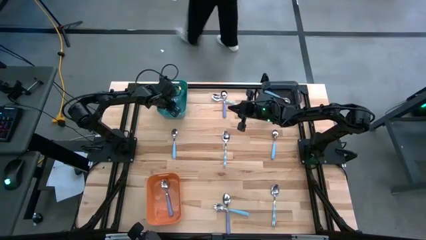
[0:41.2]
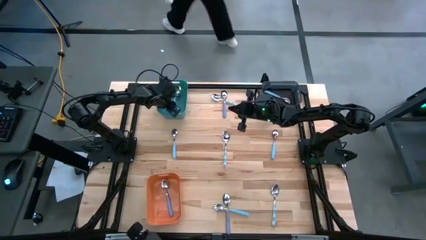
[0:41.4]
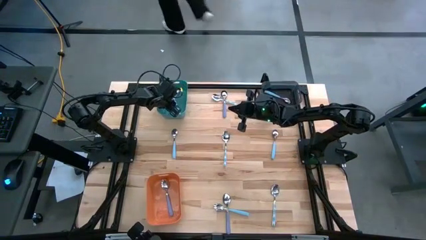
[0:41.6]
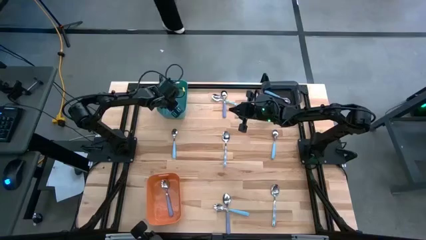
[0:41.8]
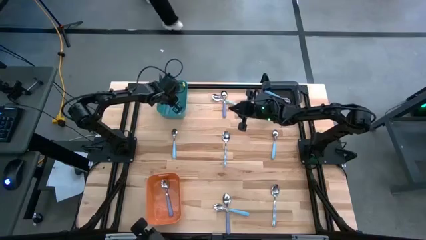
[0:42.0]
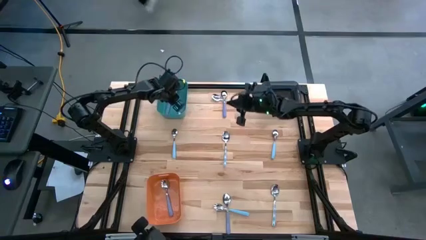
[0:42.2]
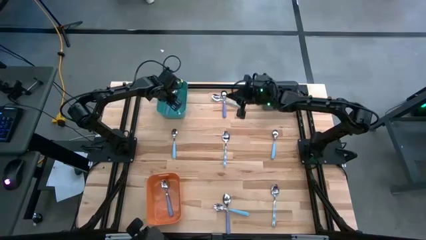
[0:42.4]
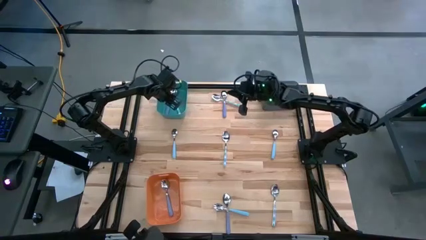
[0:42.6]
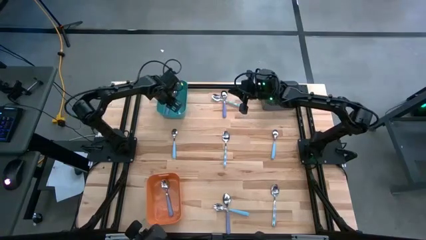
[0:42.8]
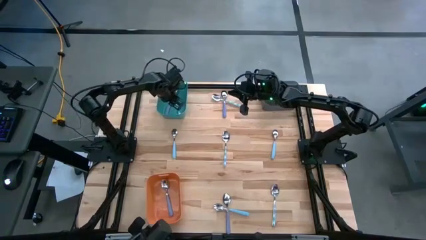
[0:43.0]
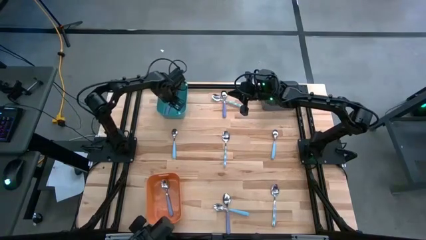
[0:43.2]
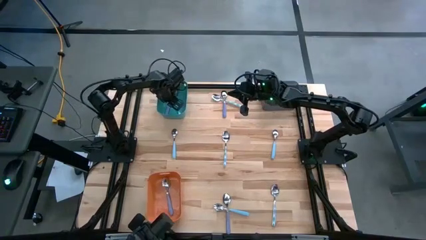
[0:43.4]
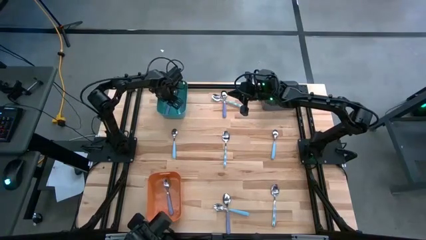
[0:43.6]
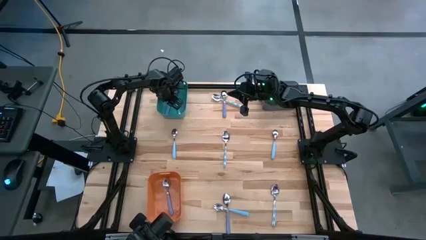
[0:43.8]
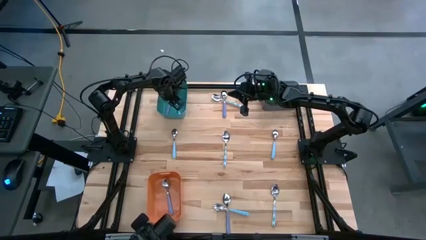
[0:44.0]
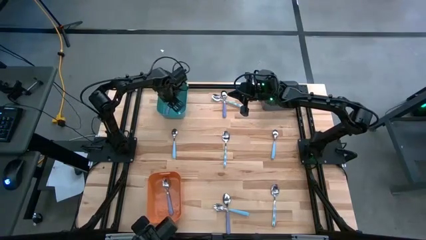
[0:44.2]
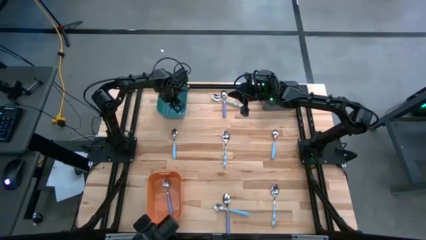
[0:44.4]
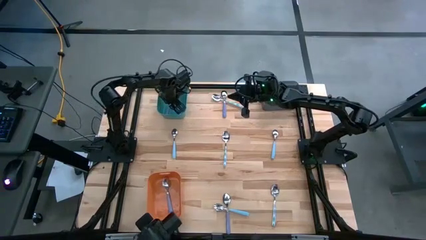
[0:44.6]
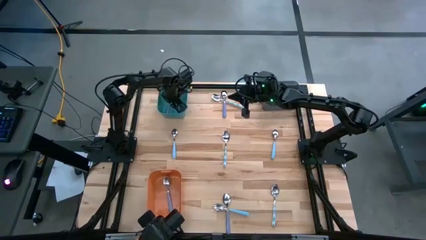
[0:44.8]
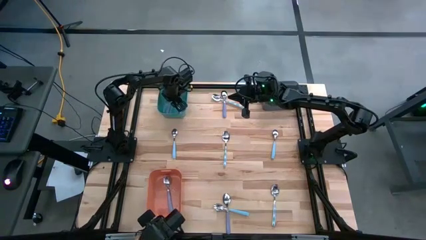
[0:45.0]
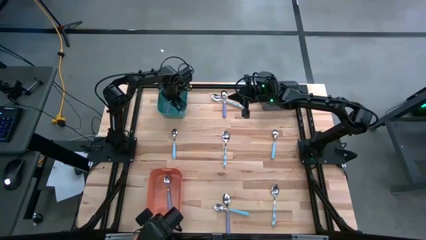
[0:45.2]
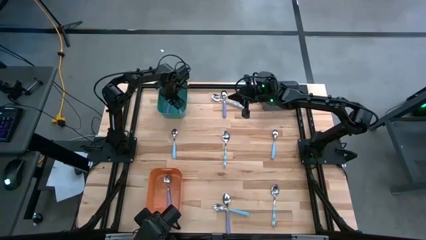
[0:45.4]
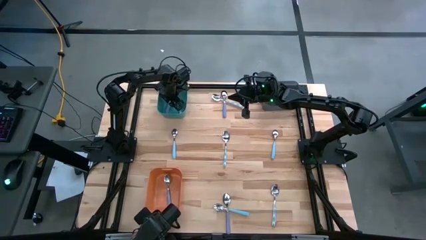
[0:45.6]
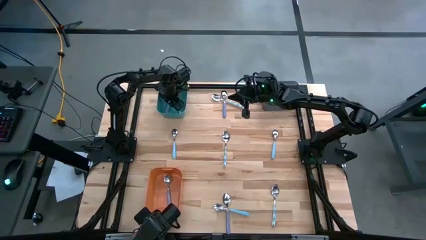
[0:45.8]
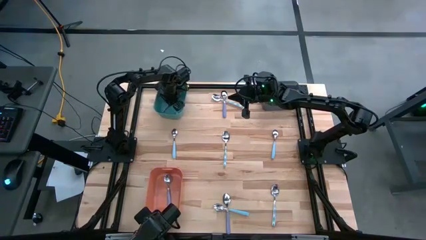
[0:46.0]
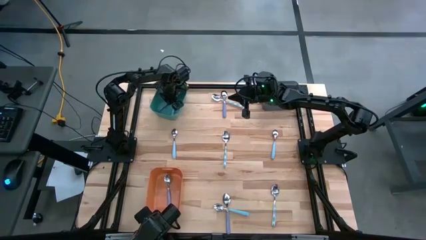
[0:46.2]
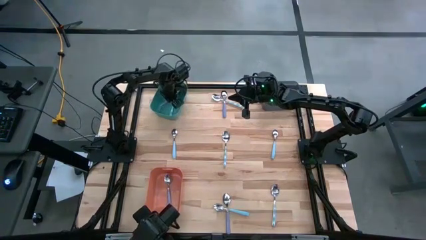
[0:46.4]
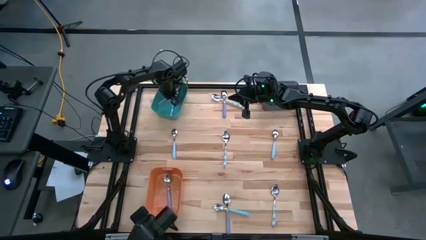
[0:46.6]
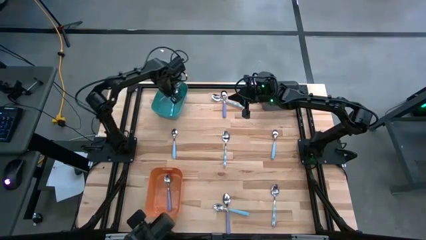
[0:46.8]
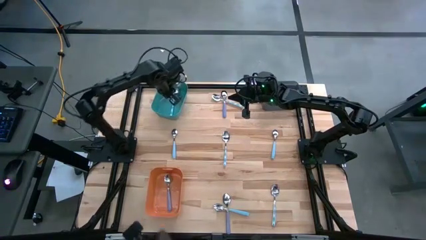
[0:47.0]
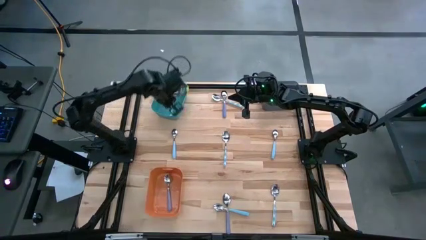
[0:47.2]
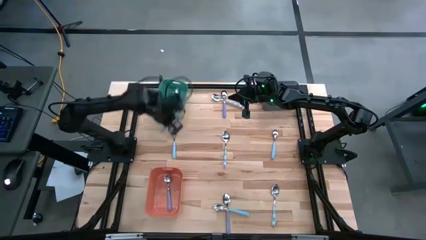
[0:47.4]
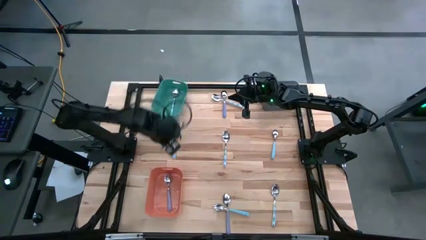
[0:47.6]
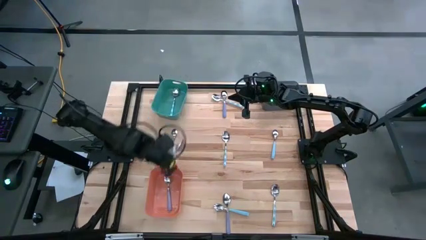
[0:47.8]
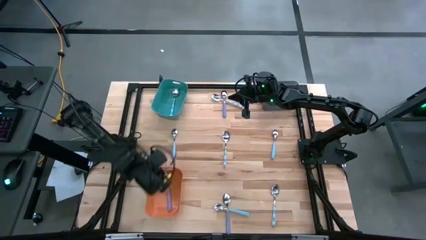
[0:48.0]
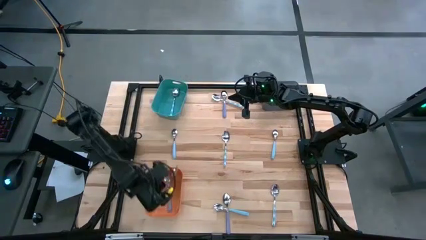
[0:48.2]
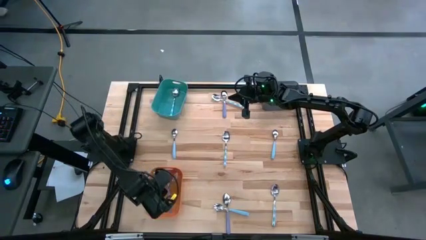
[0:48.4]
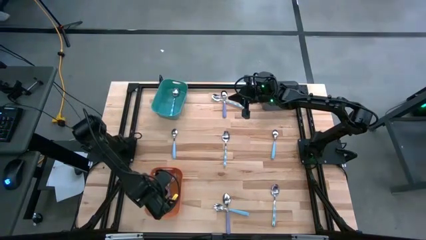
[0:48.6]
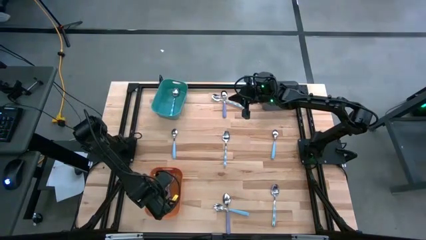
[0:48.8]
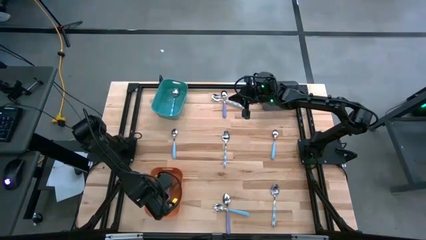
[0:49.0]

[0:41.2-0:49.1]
Task: Sort silverware by color (type)
Put the violet spoon into the orange bin

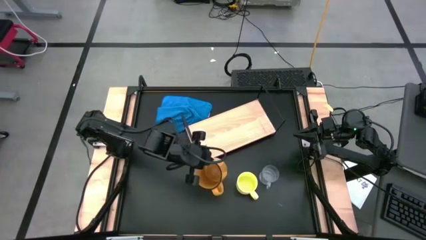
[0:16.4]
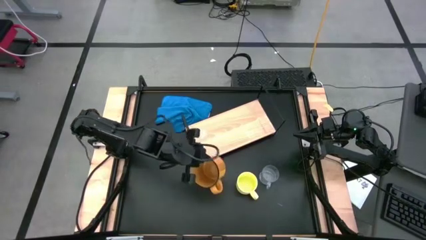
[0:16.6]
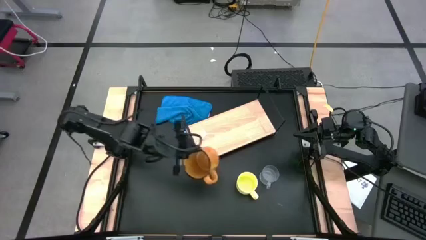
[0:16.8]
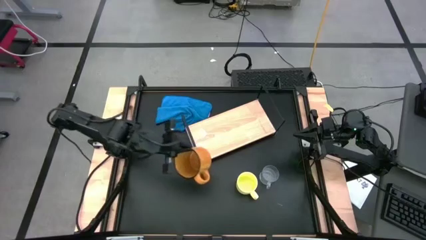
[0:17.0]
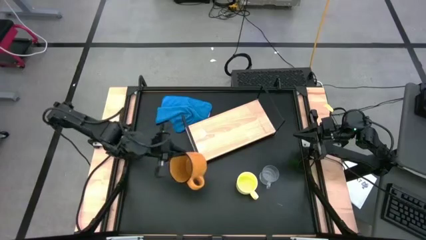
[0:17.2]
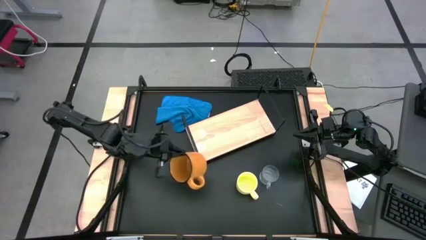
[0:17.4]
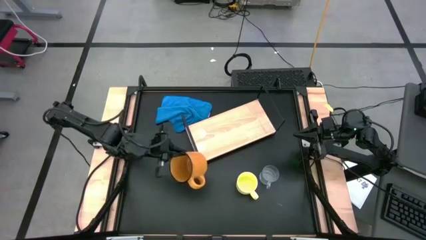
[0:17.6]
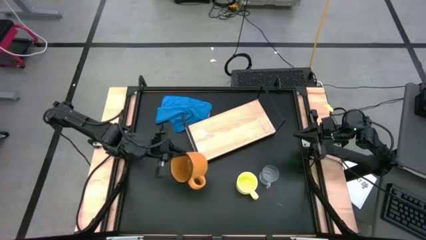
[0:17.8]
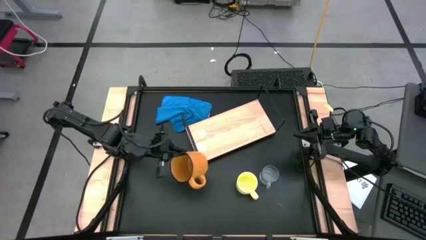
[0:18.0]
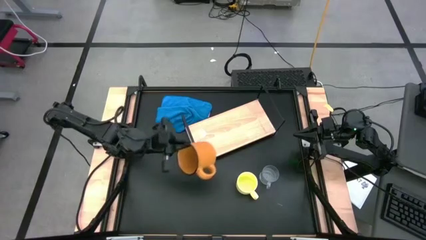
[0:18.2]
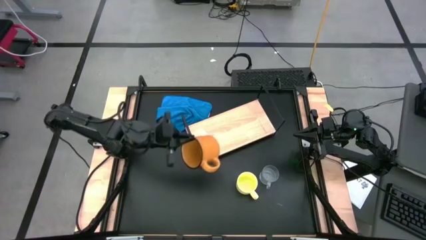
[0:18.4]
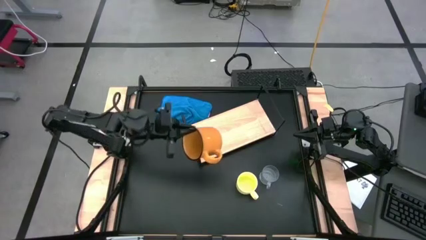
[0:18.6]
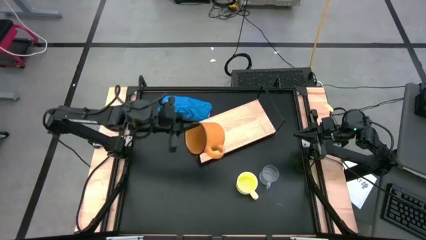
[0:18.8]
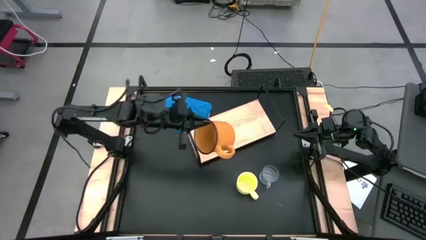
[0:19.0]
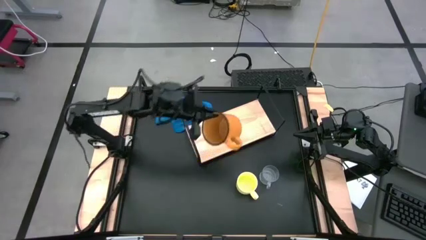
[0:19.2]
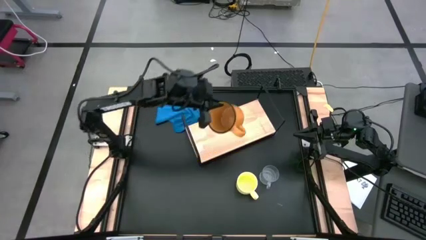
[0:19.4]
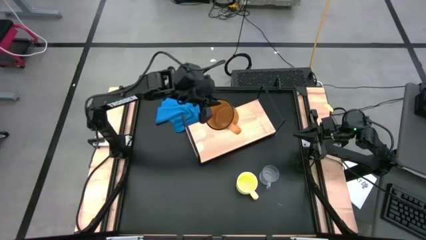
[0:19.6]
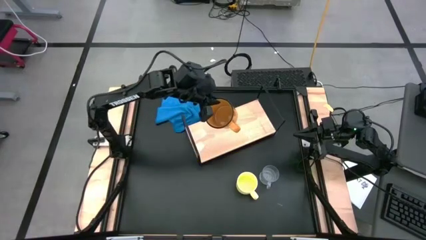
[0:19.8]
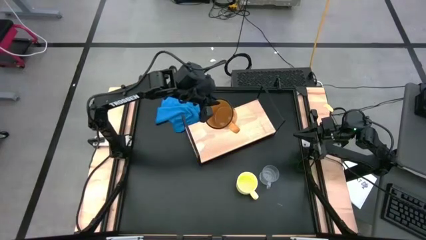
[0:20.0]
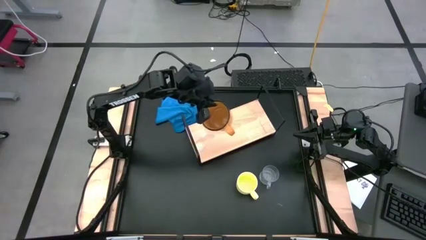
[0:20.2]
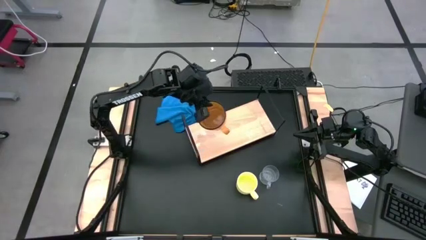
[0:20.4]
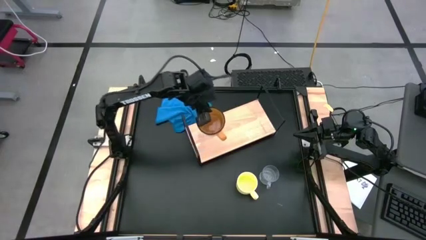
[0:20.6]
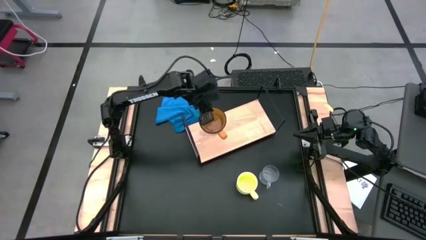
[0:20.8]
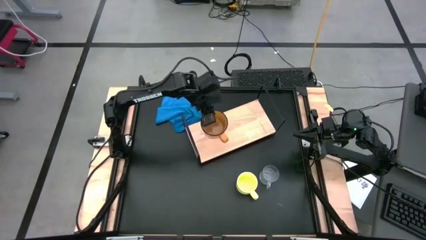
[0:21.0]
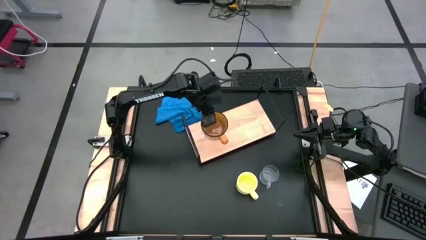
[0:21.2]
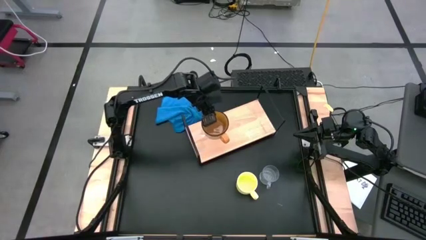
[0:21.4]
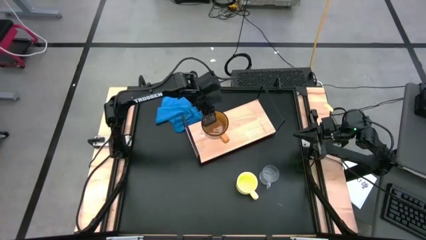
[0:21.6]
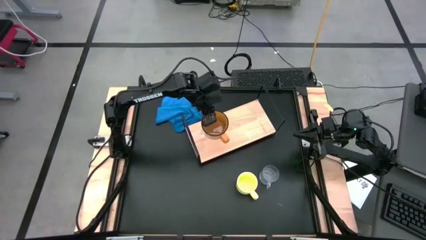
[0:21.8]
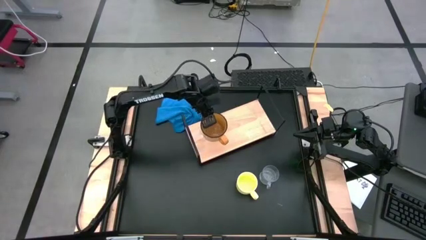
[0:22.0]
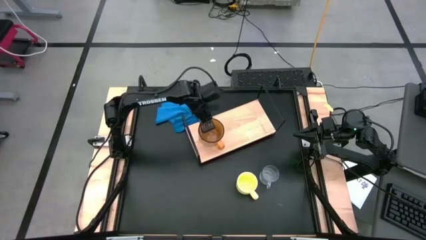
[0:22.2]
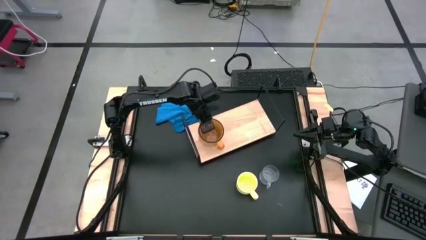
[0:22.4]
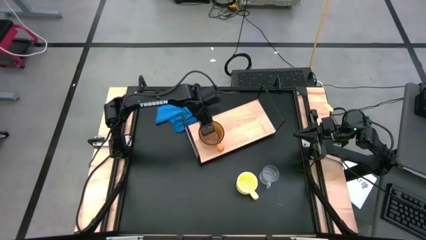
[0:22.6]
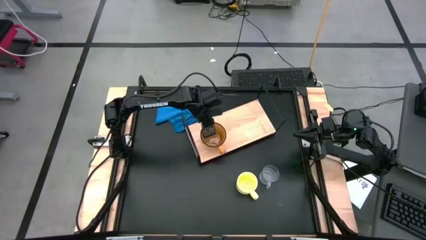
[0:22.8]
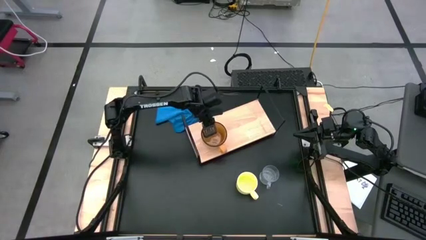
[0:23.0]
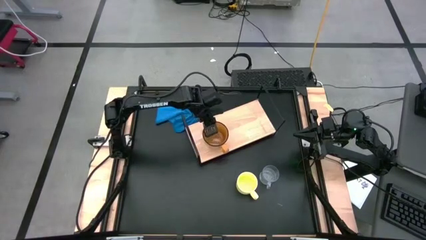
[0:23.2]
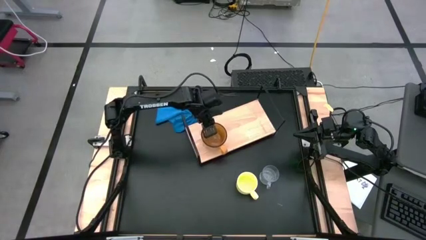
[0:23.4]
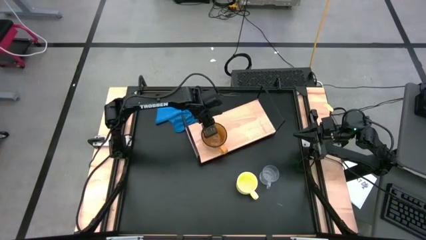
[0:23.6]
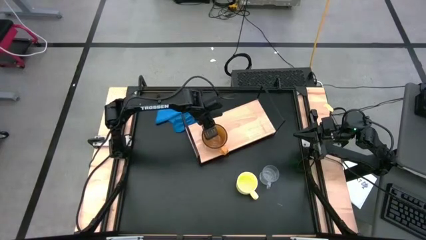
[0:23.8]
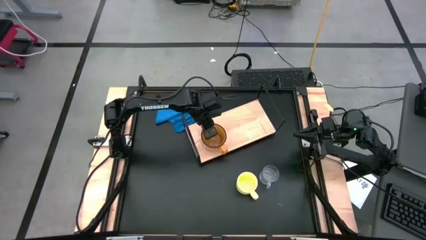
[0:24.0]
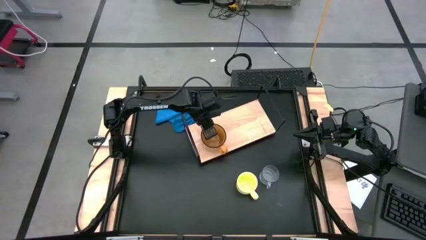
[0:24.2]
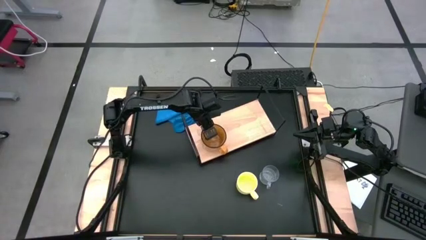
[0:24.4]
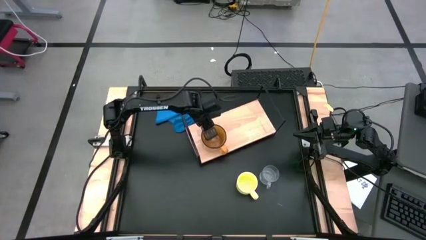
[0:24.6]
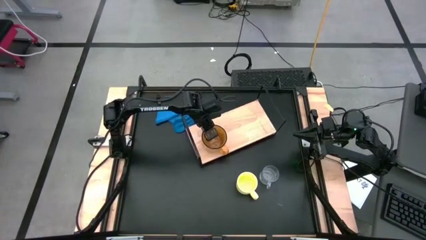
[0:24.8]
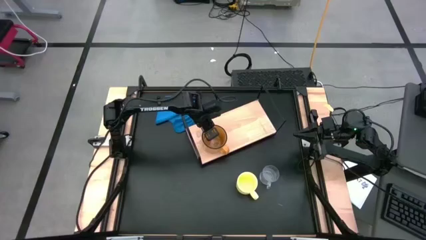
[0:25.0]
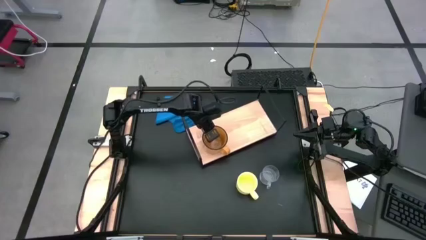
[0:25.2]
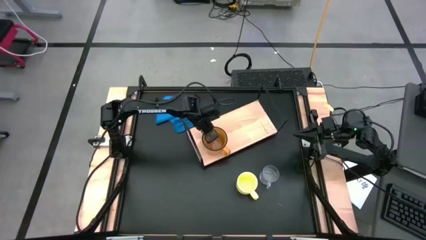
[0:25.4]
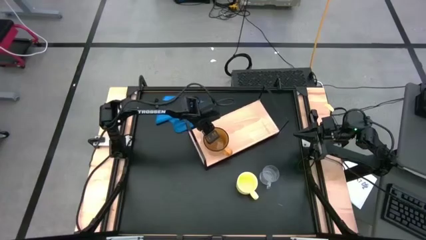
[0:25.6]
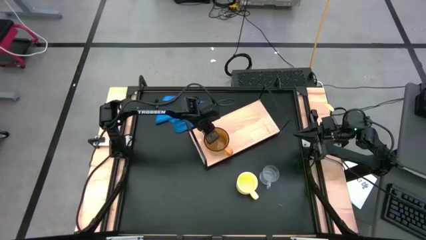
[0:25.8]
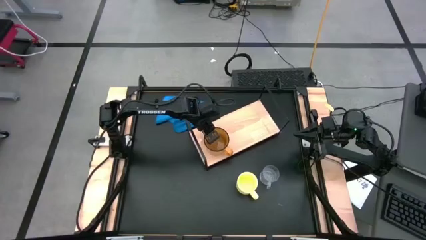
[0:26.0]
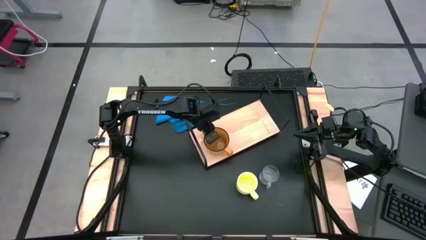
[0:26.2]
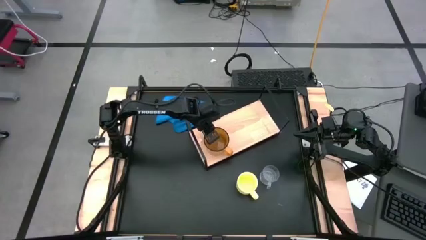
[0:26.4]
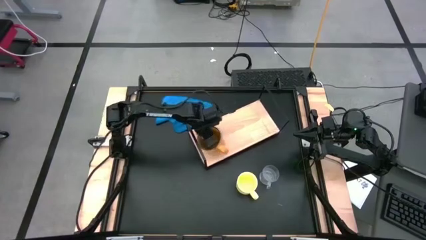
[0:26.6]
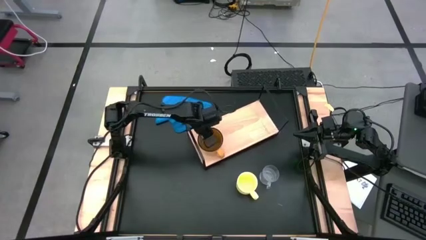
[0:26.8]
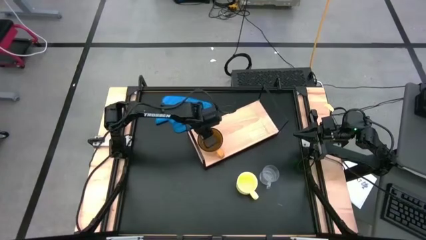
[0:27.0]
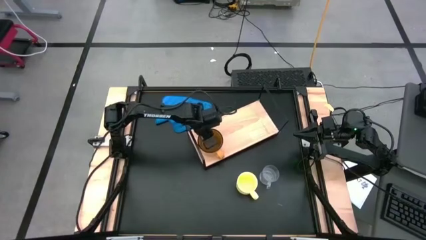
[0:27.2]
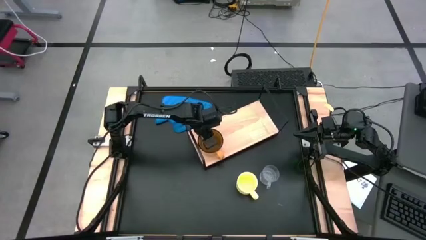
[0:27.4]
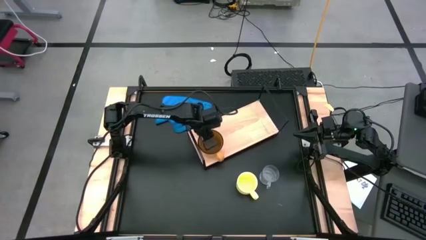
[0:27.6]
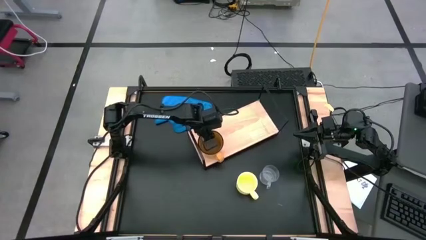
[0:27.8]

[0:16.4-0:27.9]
Task: Stack small to large cups/mugs on shelf
Put the brown mug on the shelf
